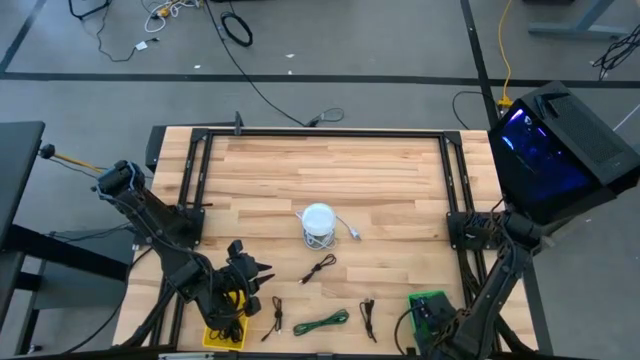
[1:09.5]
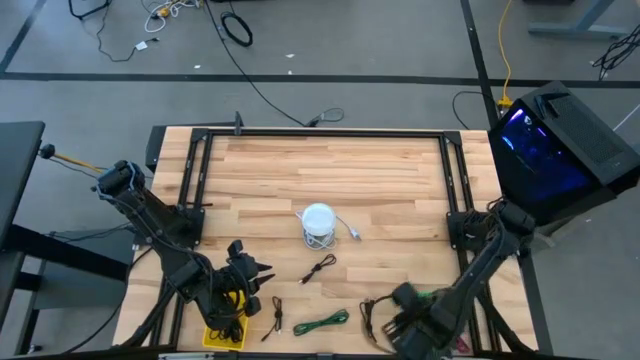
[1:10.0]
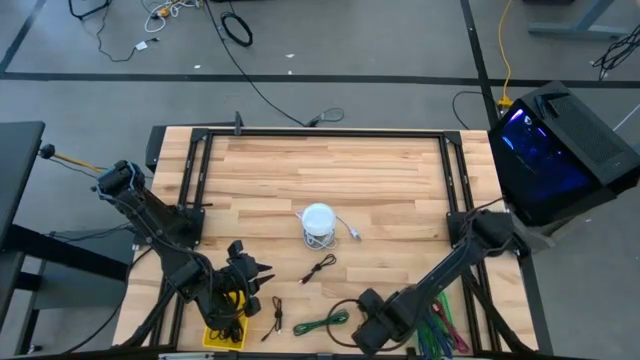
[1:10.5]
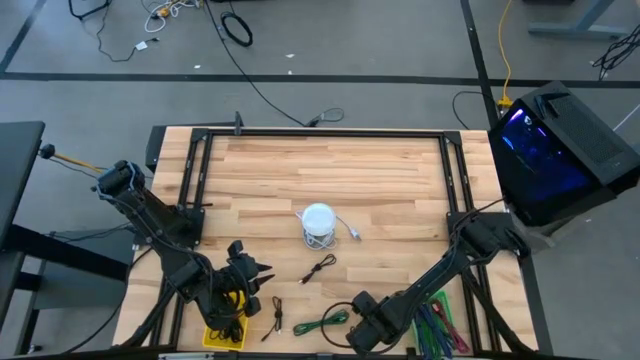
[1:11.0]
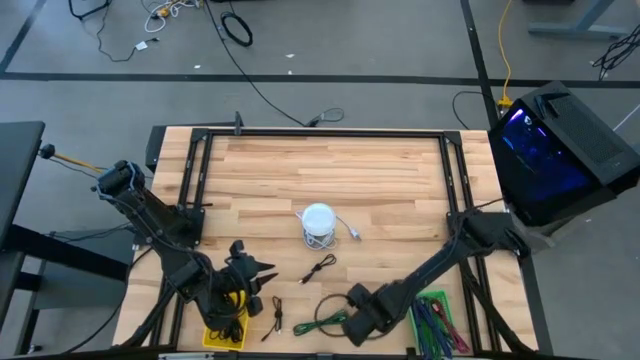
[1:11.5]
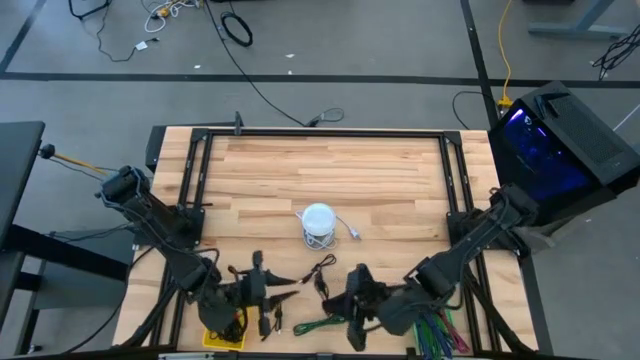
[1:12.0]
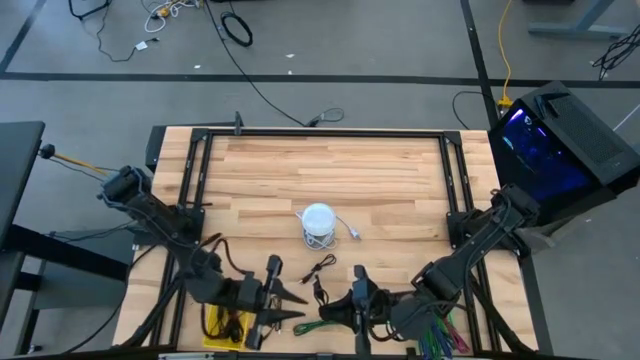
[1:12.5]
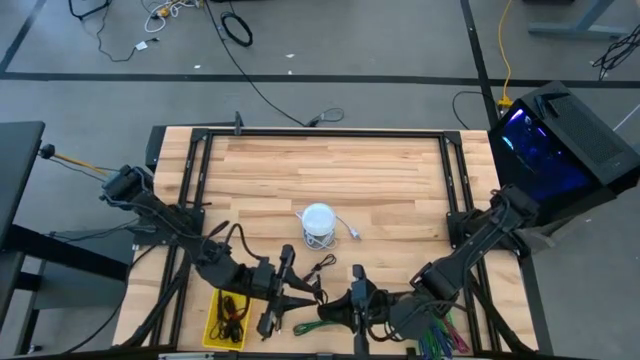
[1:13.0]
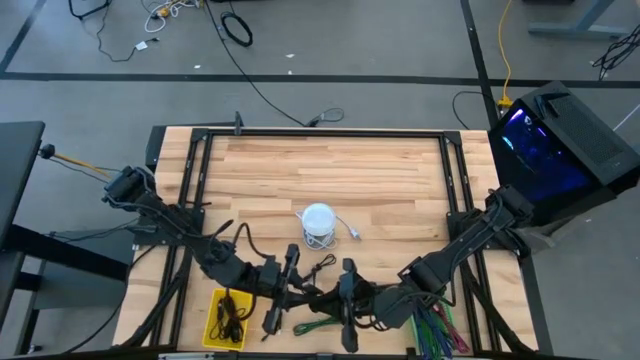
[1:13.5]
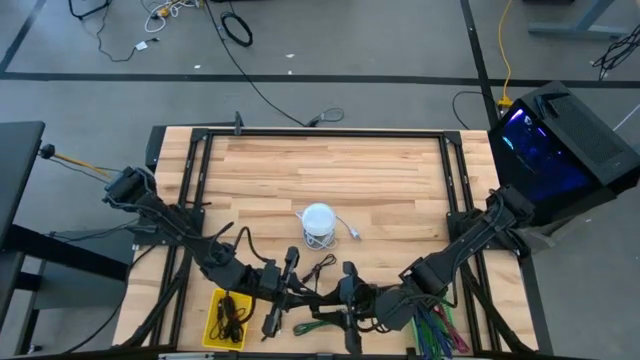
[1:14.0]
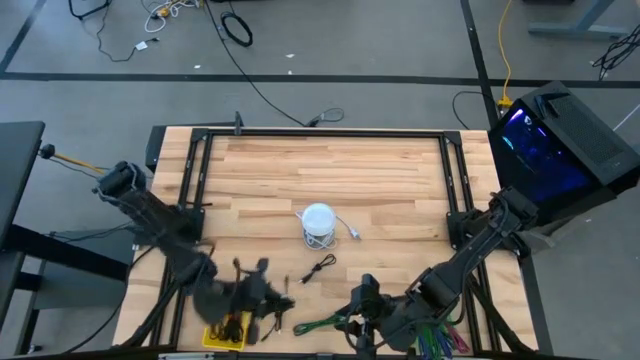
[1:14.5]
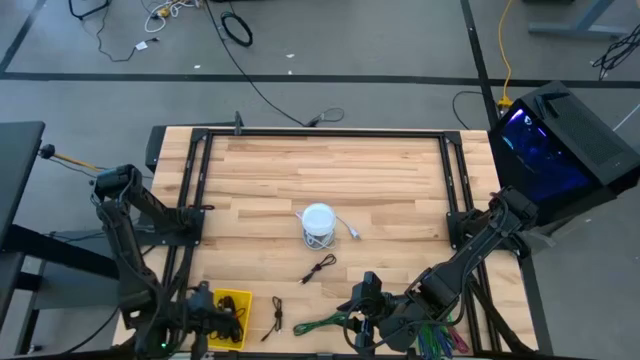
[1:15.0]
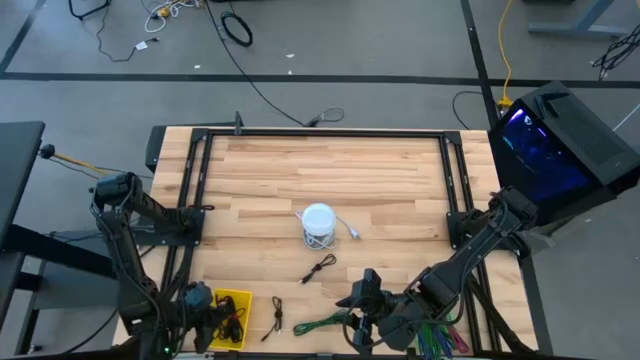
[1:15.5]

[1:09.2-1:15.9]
Task: Pick & Place USB Port
Put the bottom right black charger cable into the yellow bin

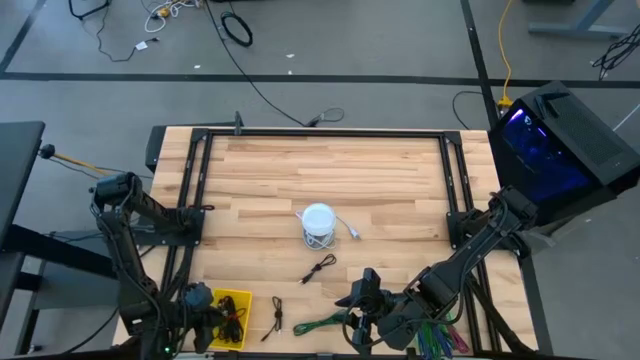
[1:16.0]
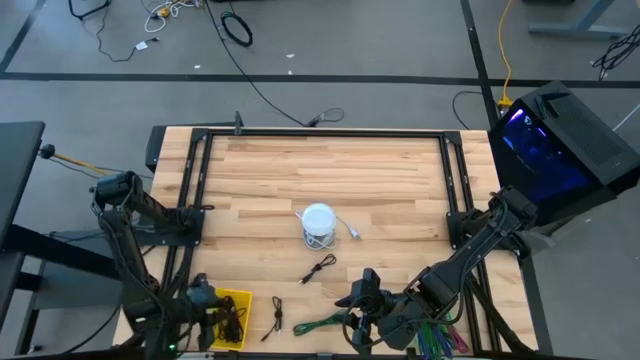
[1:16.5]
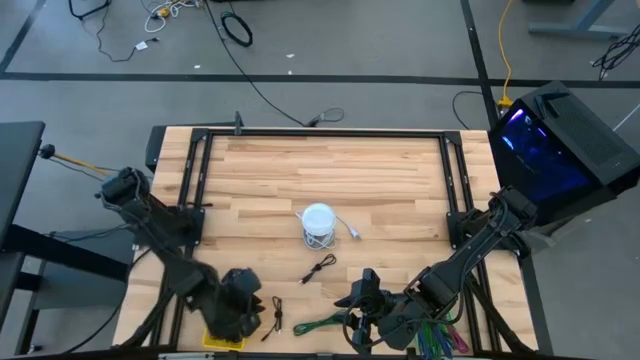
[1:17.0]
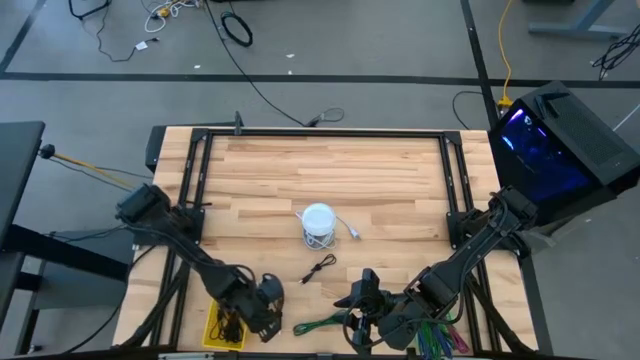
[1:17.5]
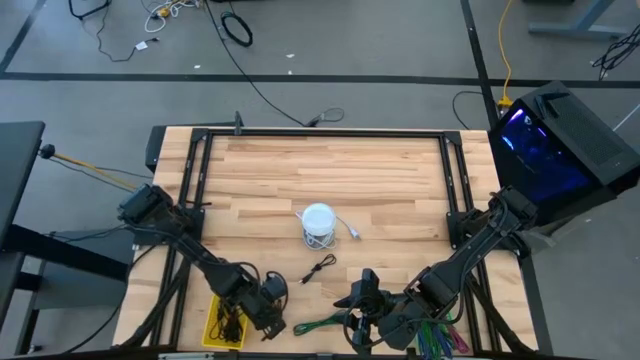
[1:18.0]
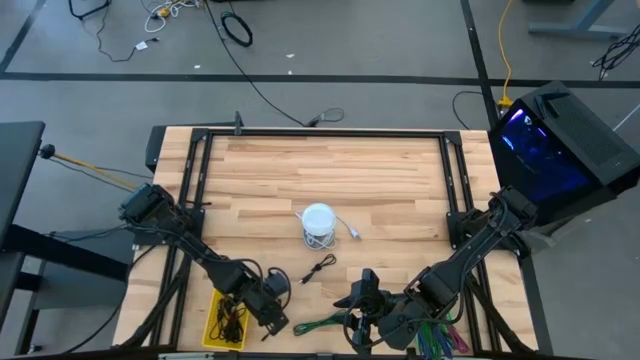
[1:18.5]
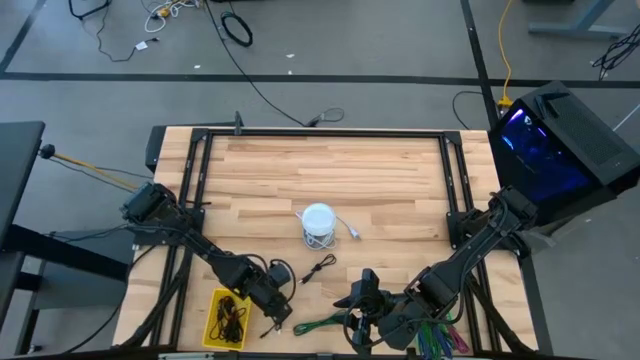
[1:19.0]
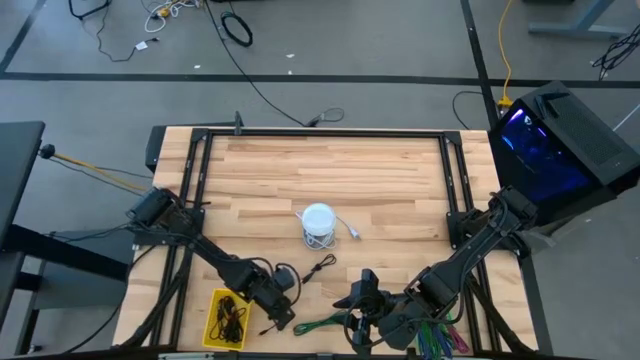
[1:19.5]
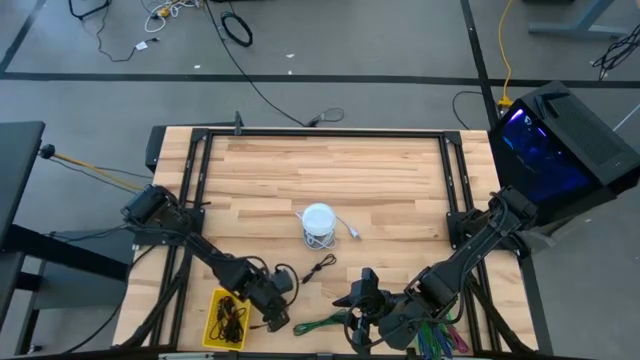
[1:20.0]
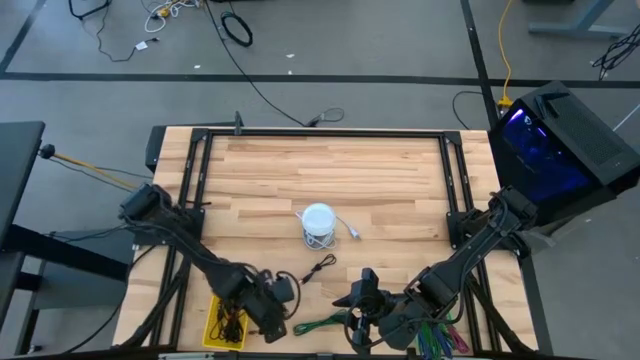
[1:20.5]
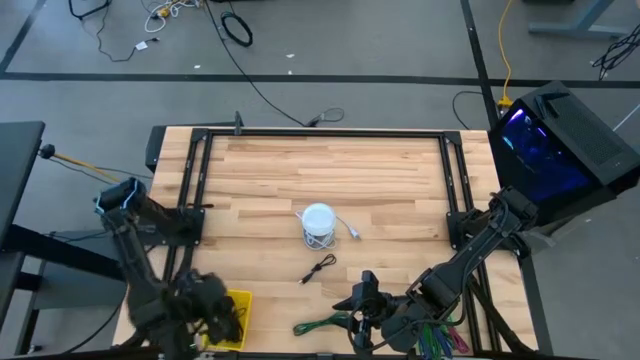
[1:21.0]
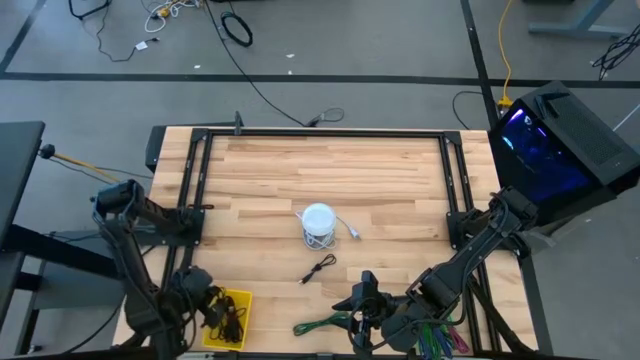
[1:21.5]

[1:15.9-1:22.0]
Put the bottom black charger cable into the yellow bin

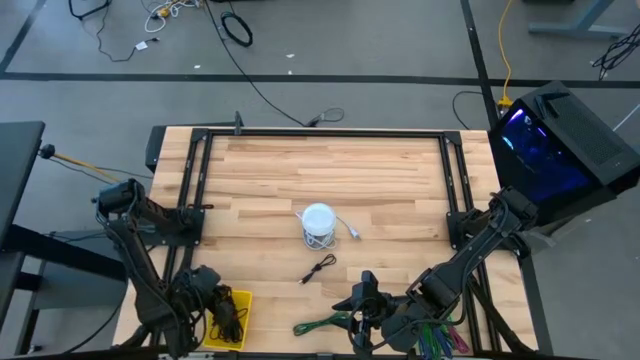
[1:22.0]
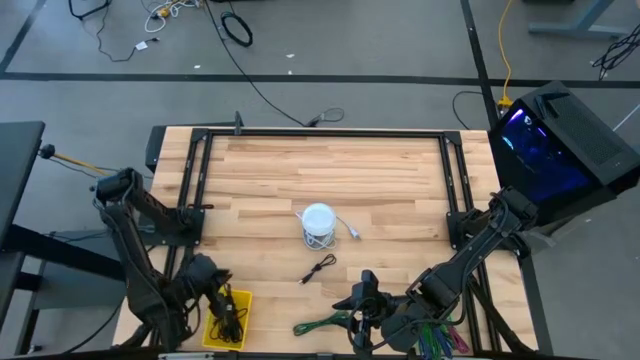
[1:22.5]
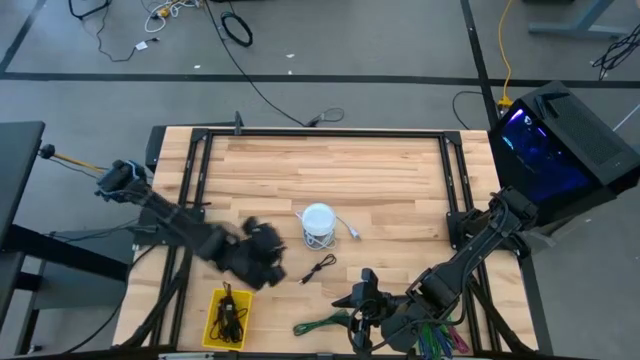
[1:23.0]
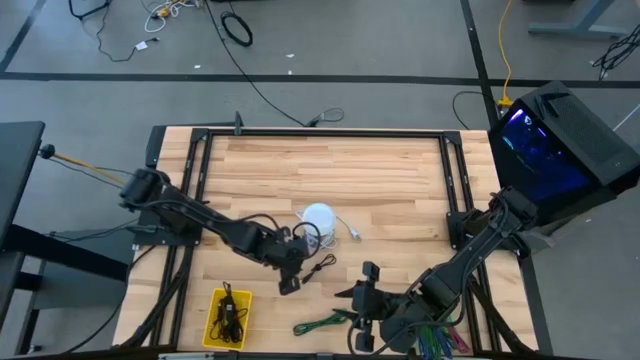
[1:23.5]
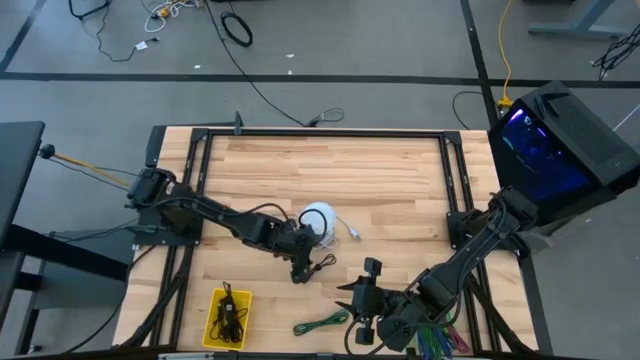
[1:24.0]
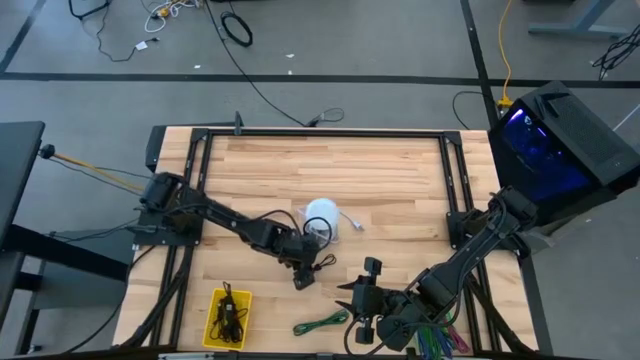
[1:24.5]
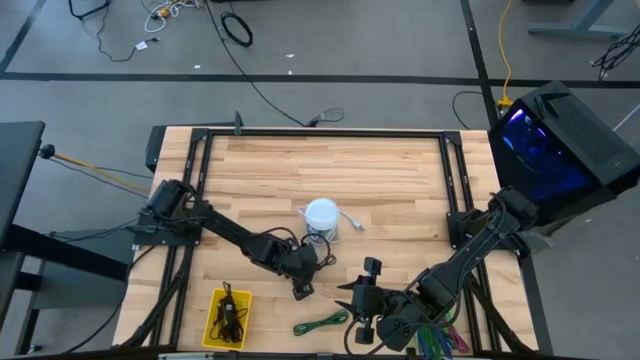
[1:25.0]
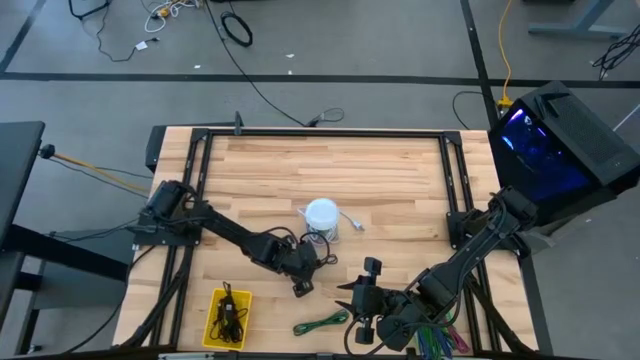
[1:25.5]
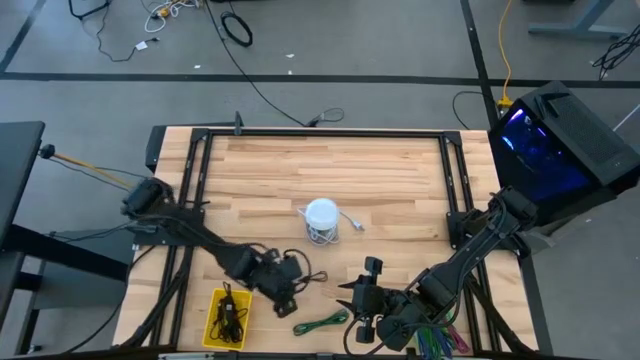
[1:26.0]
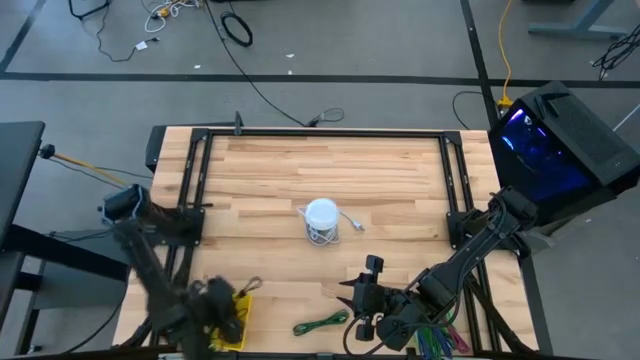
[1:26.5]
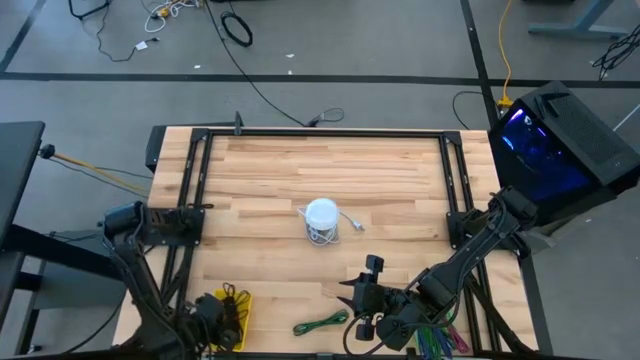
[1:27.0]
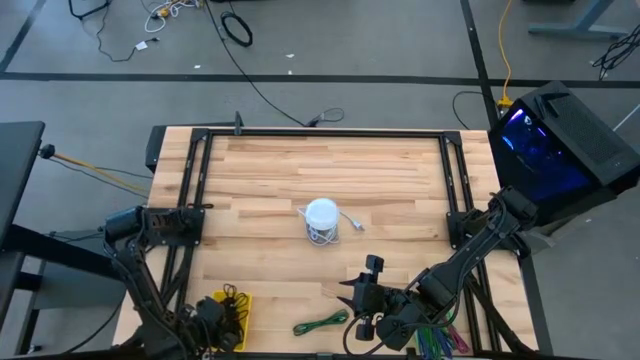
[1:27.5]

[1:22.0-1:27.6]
Put the black charger cable into the yellow bin

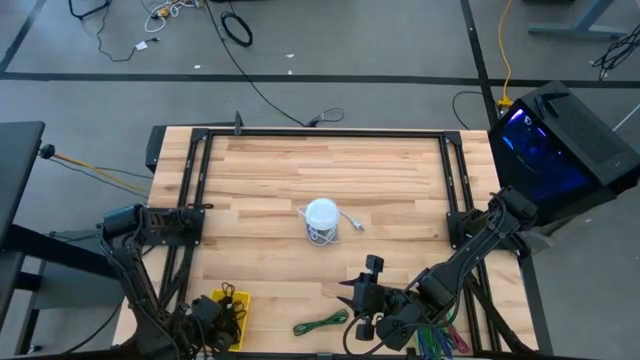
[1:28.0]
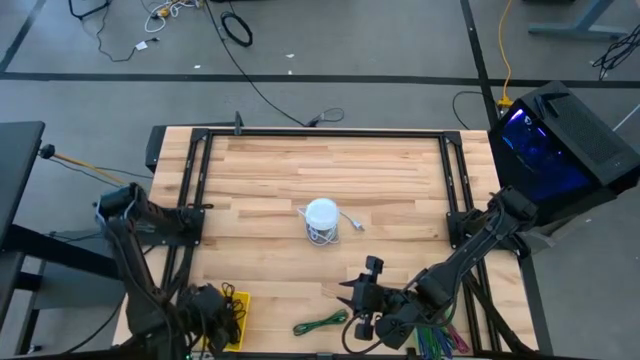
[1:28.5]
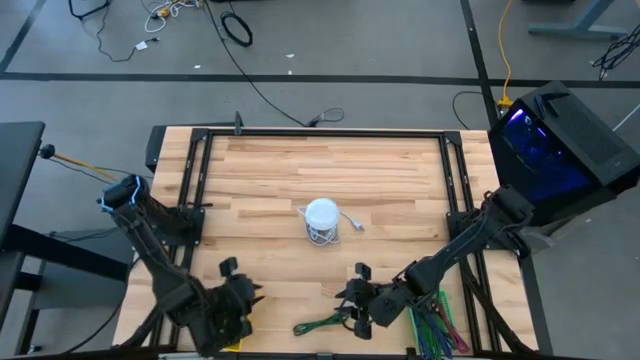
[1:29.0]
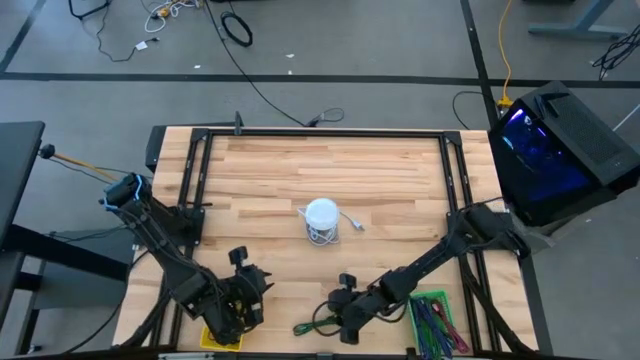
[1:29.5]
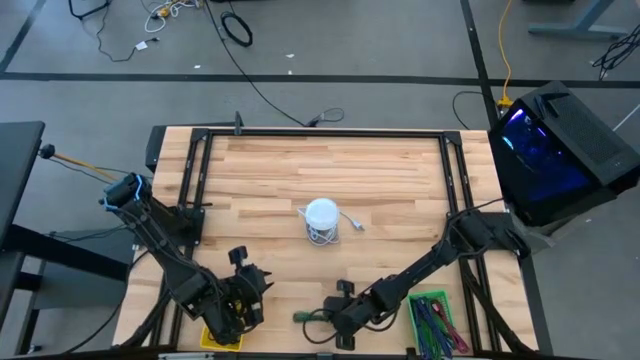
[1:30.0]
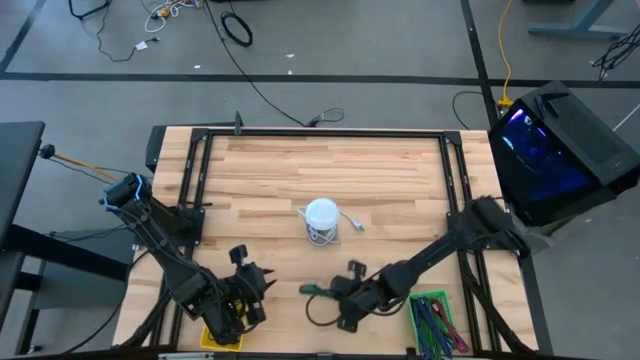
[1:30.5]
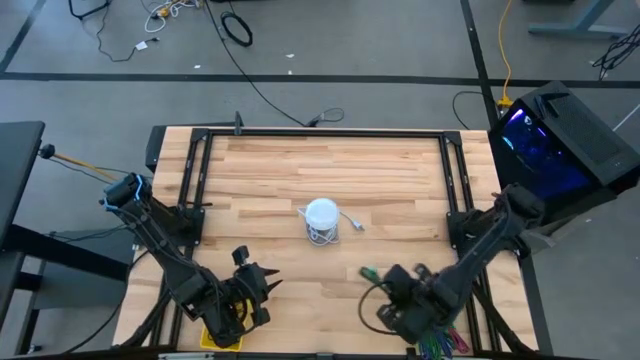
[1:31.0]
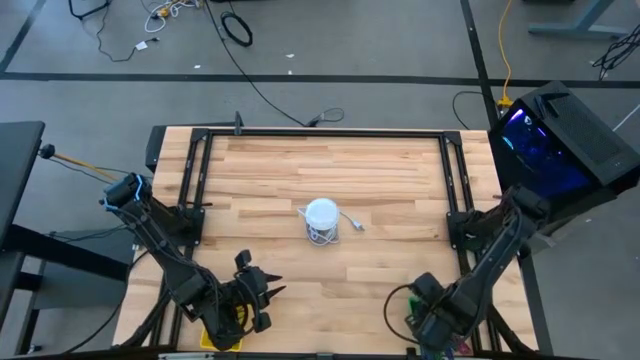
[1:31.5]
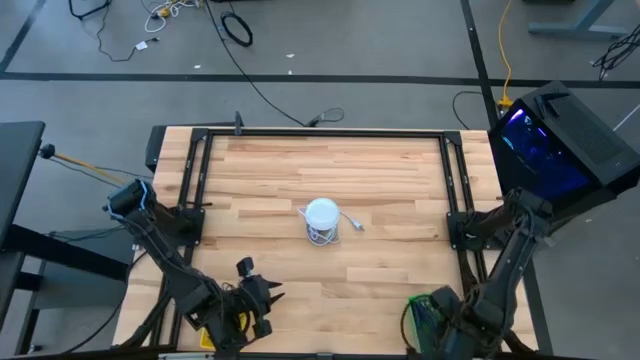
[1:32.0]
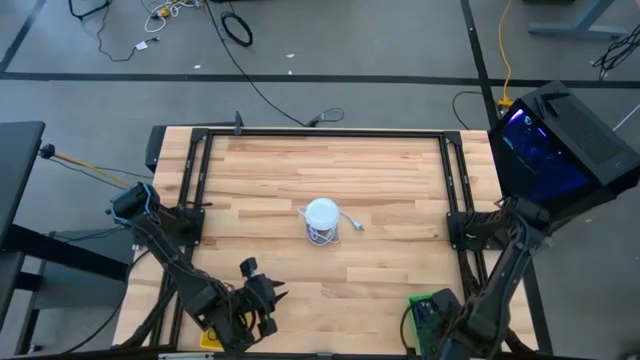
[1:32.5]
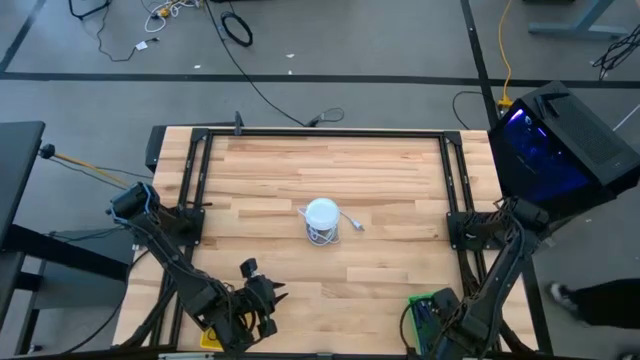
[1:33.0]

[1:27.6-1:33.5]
Put the green charger cable into the green bin
